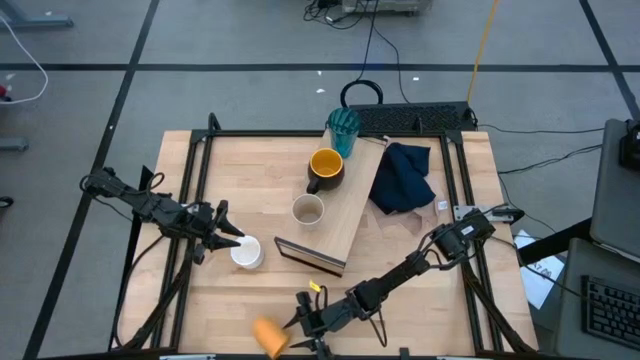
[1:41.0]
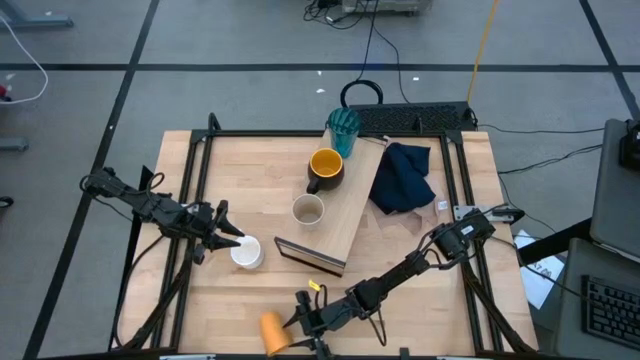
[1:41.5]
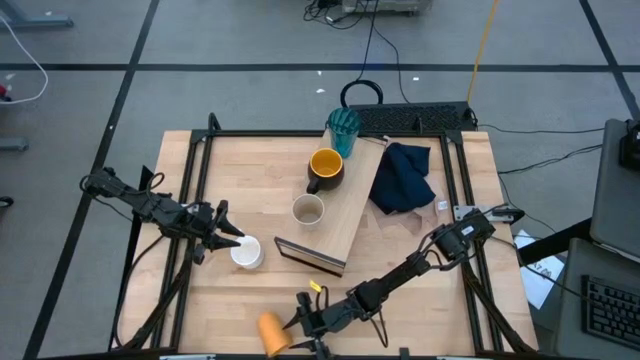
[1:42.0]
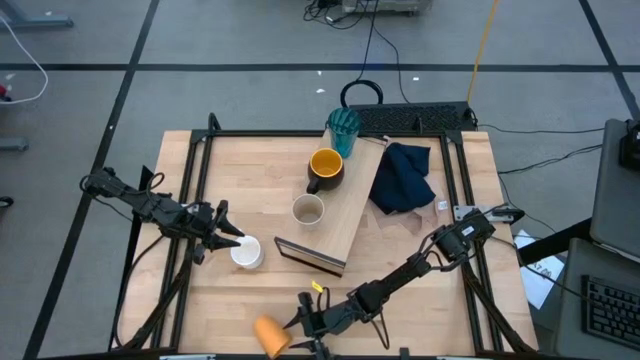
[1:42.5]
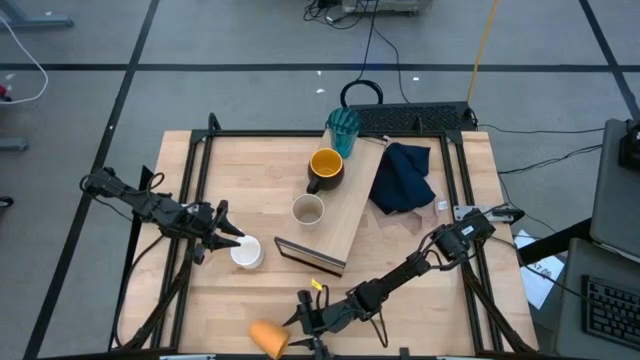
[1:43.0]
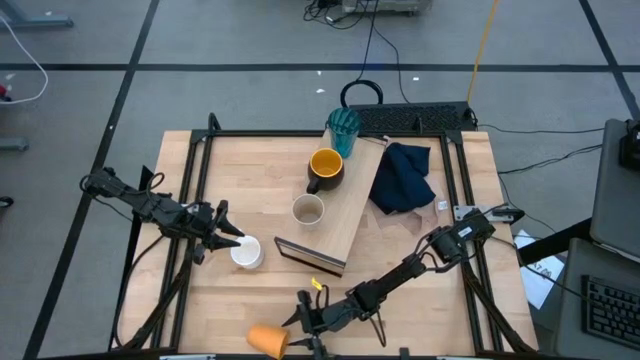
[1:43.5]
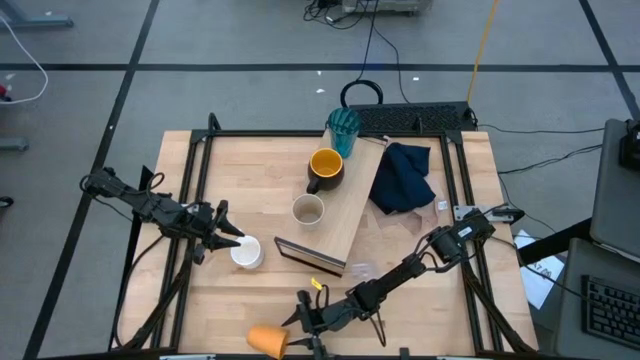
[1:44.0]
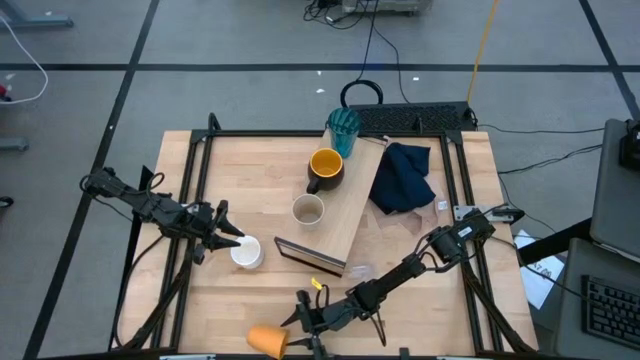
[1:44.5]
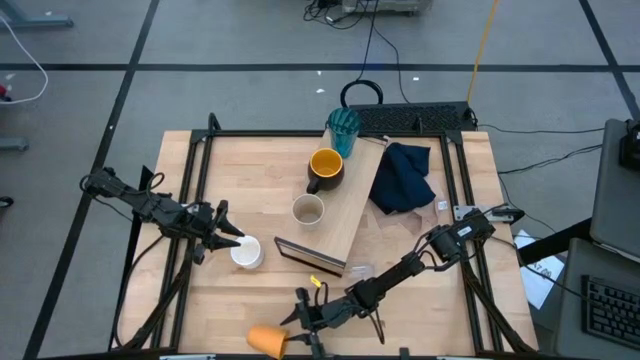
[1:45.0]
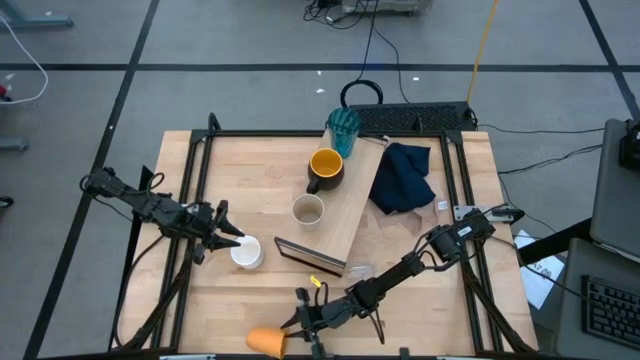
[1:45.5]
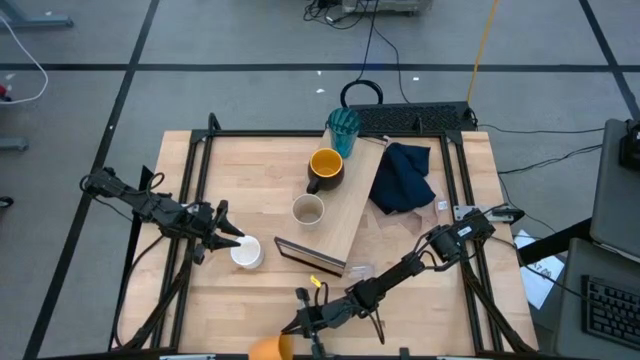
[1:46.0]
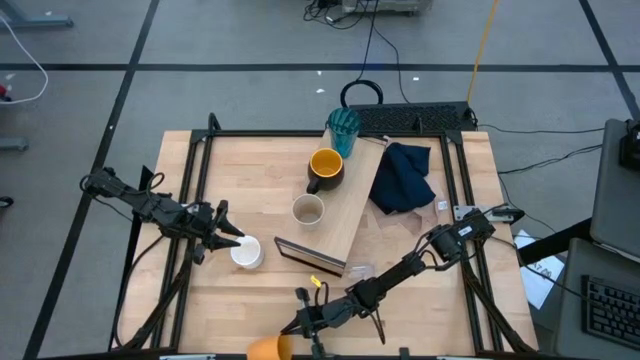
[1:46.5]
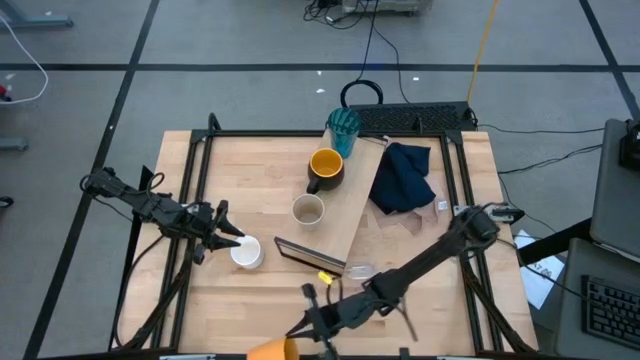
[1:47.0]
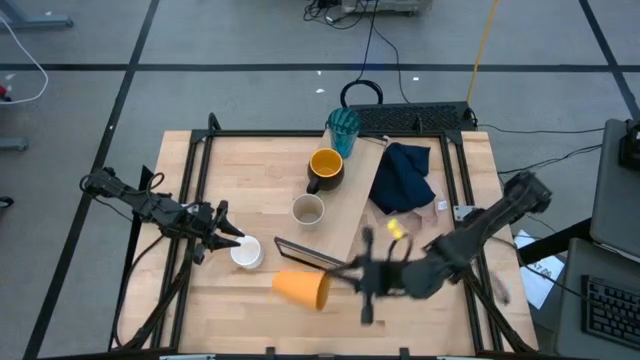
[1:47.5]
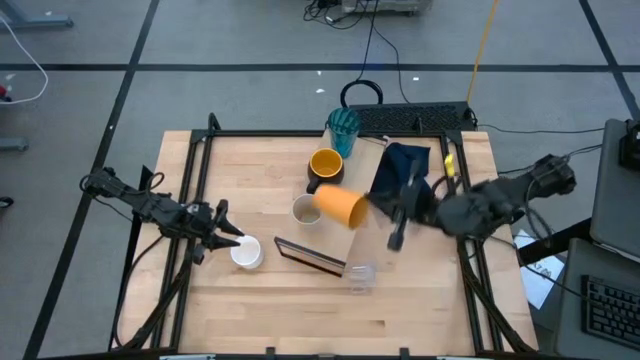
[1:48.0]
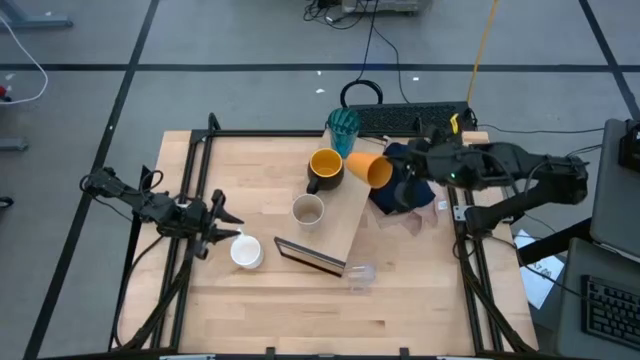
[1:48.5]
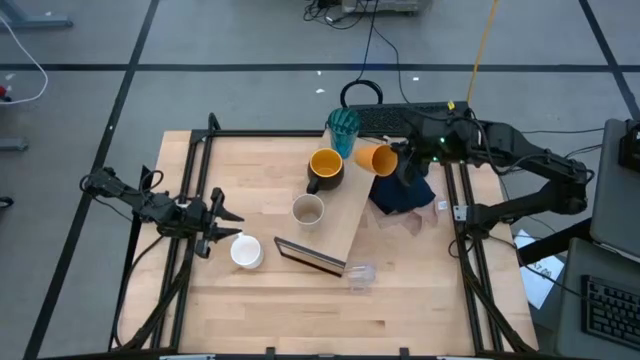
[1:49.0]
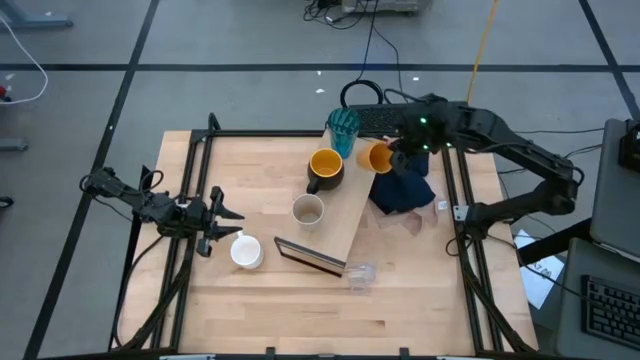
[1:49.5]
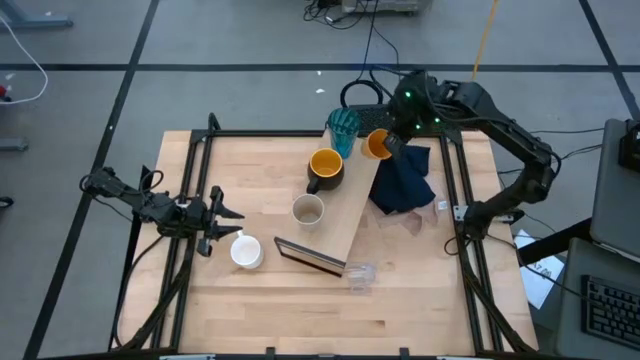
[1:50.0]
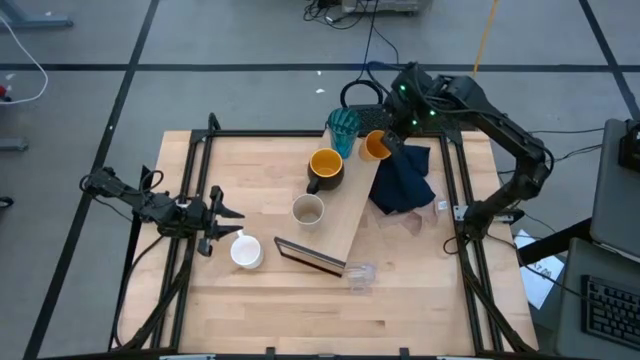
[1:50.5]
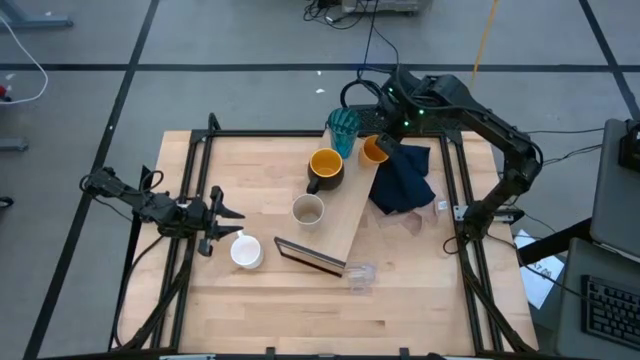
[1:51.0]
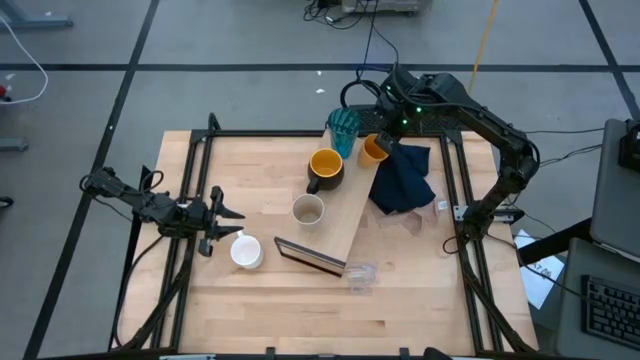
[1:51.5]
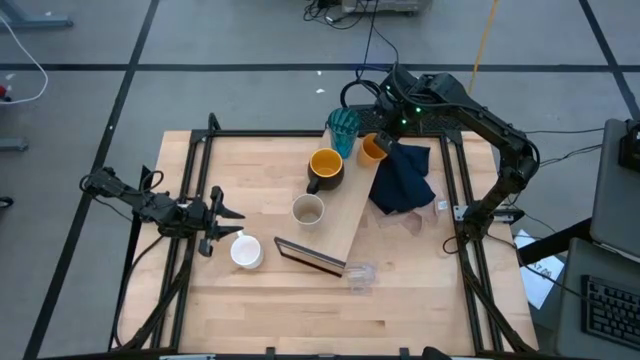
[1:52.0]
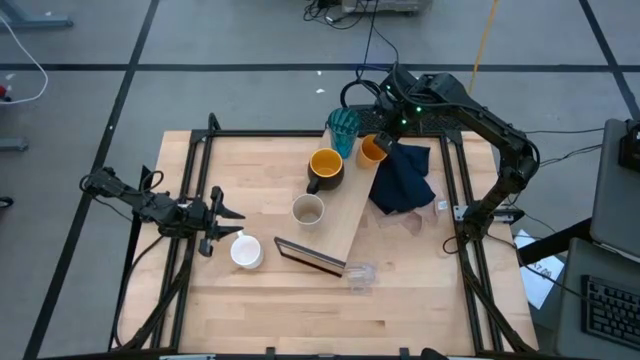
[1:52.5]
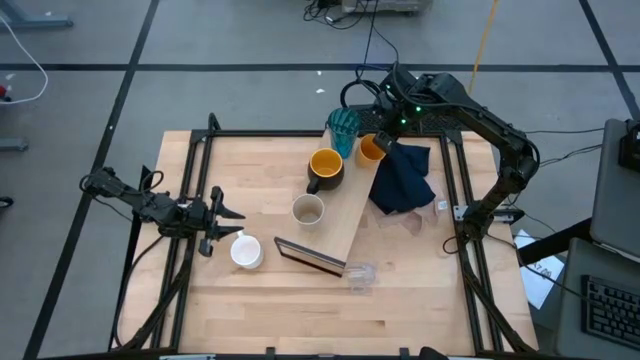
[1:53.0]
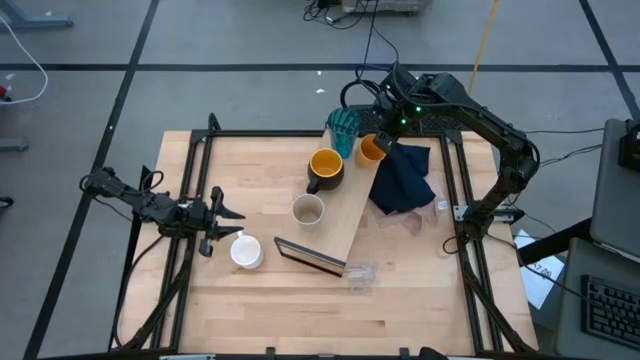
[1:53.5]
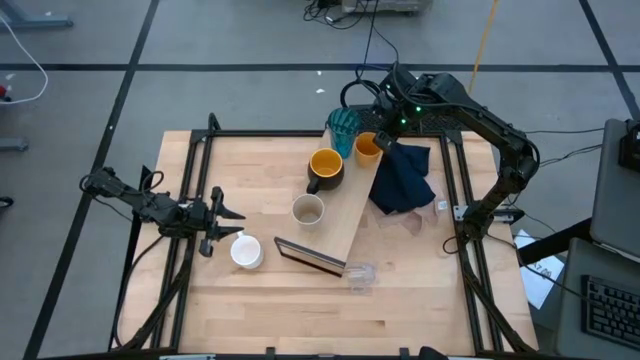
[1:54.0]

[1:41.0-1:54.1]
Task: Stack small to large cups/mugs on shelf
Put the yellow cup on the shelf

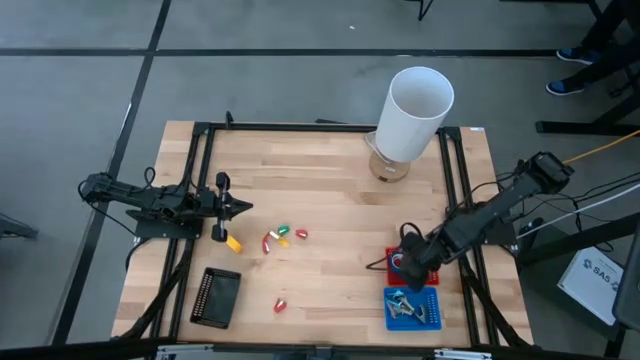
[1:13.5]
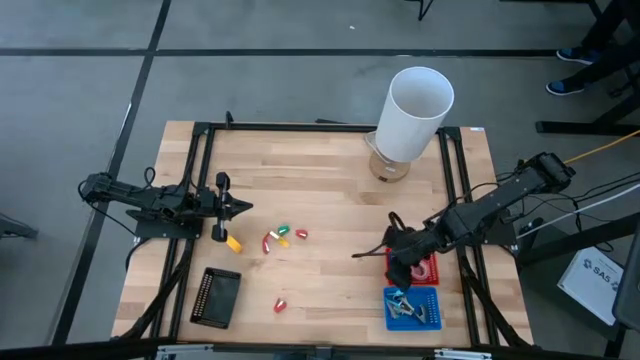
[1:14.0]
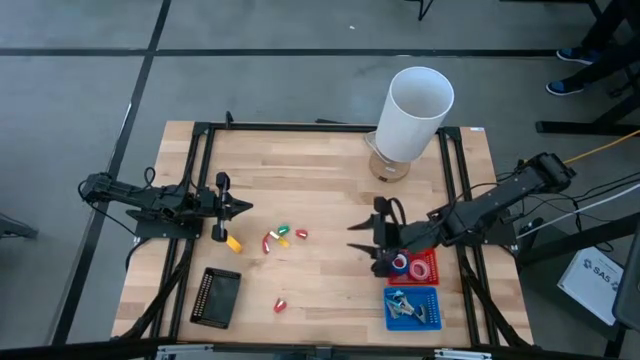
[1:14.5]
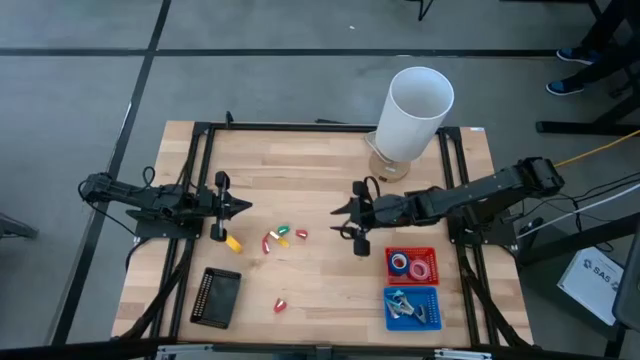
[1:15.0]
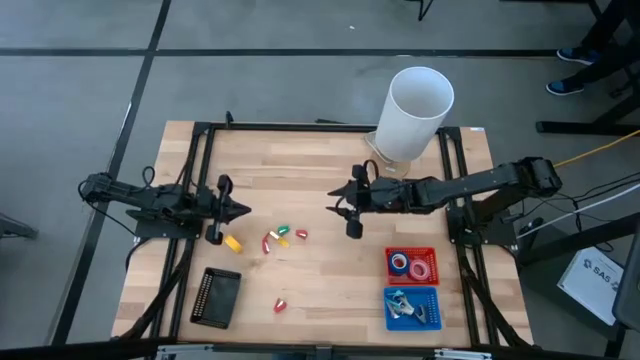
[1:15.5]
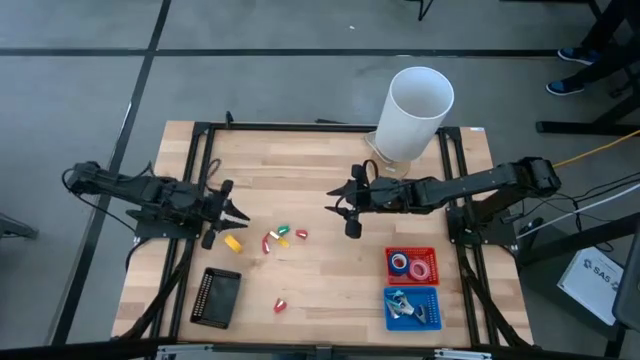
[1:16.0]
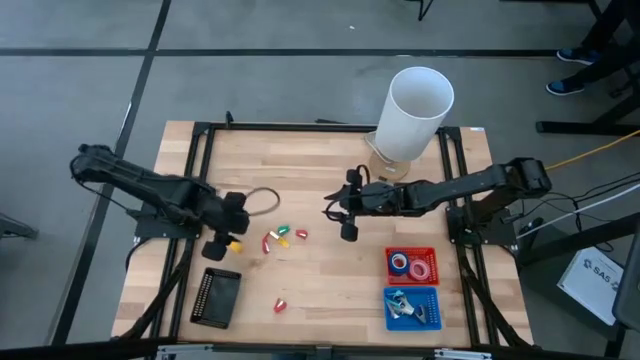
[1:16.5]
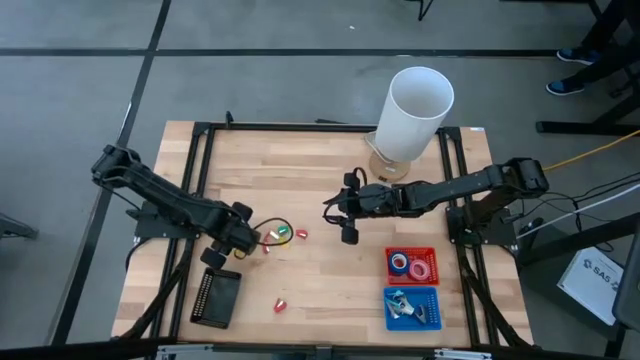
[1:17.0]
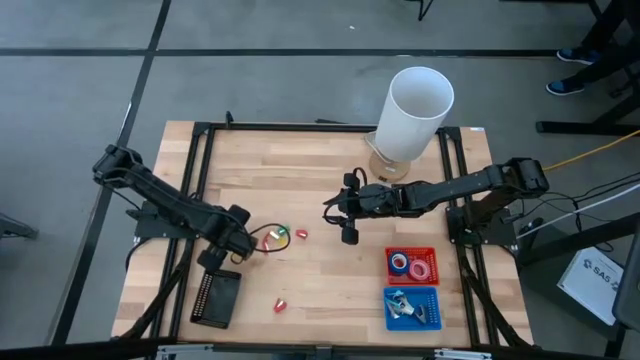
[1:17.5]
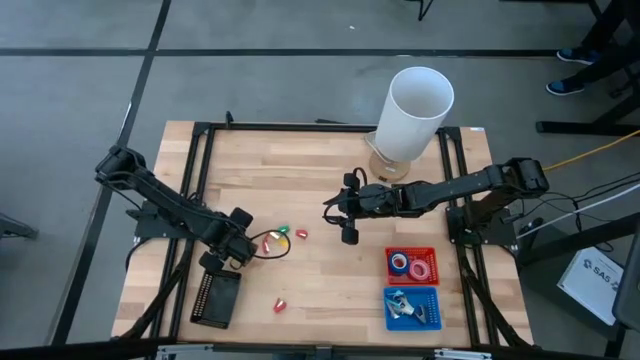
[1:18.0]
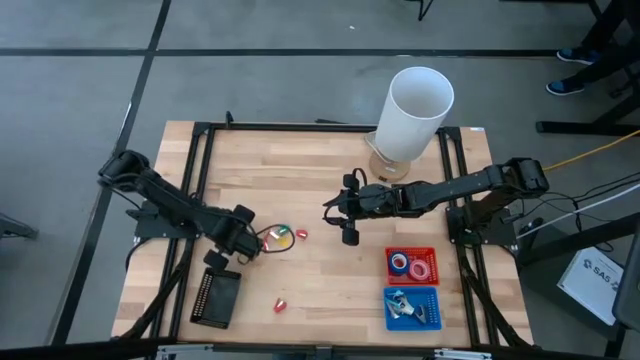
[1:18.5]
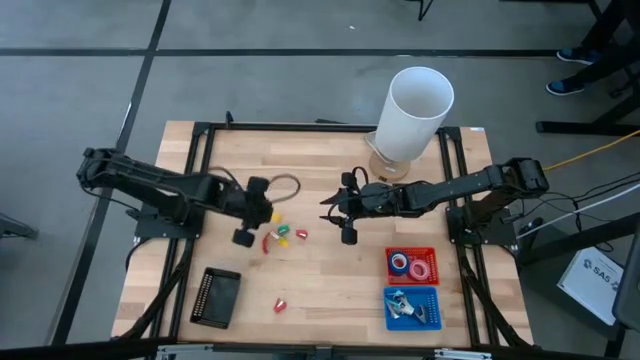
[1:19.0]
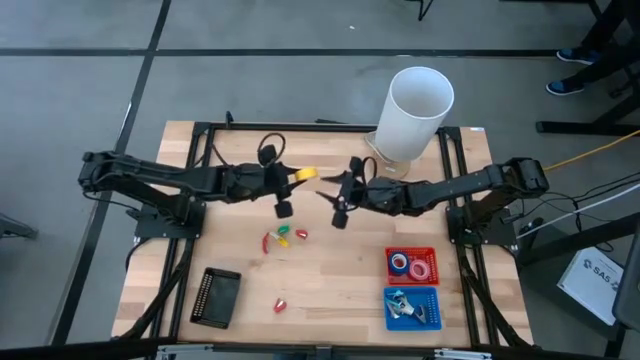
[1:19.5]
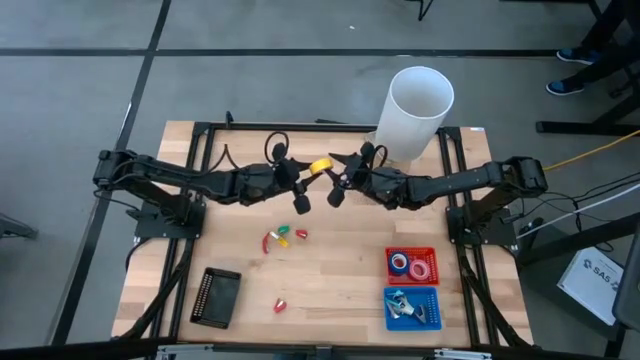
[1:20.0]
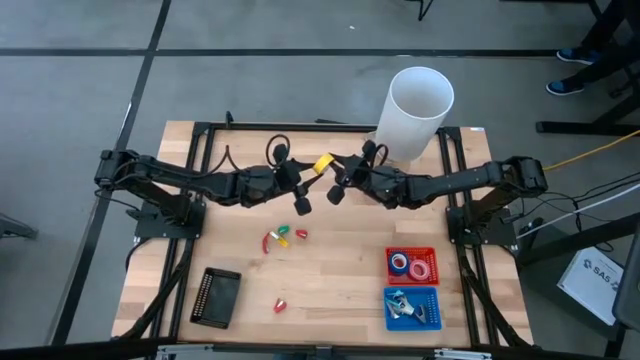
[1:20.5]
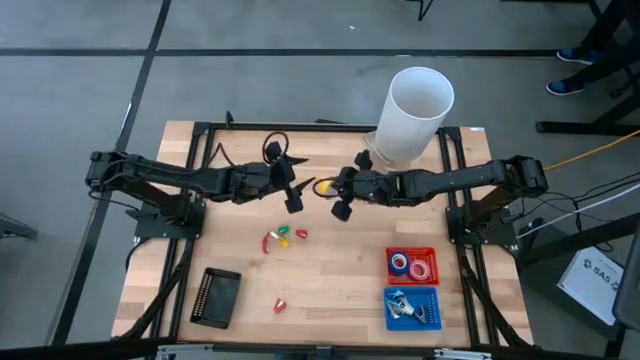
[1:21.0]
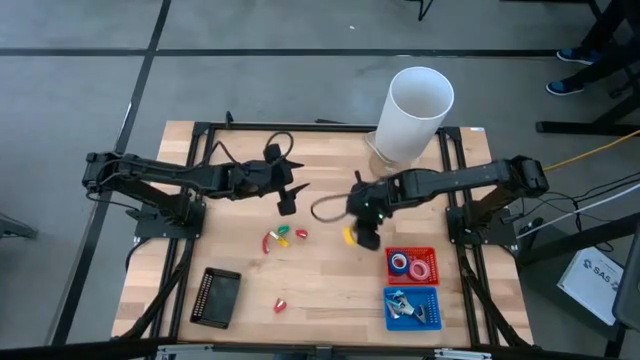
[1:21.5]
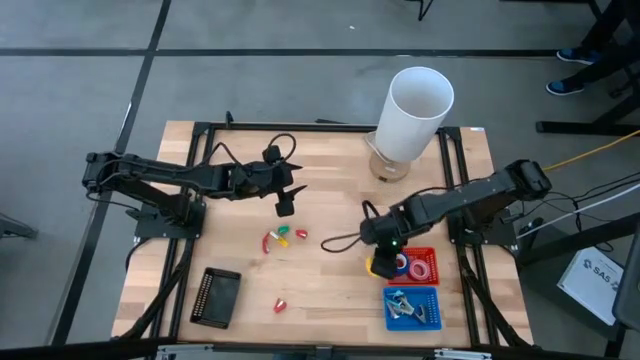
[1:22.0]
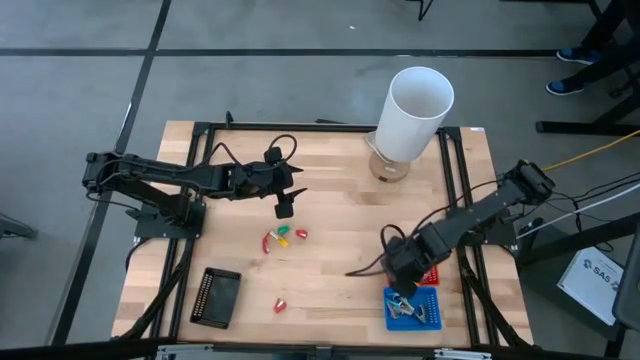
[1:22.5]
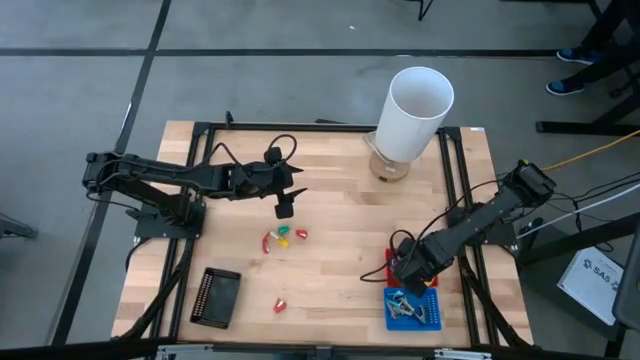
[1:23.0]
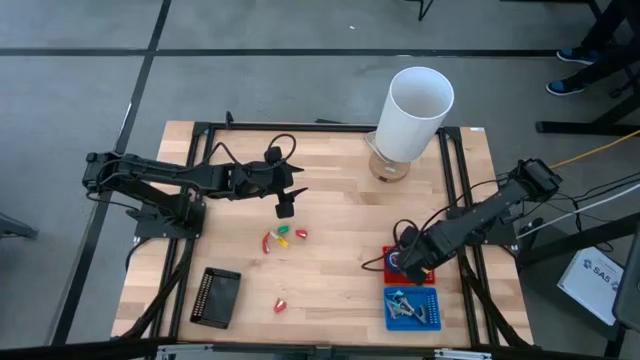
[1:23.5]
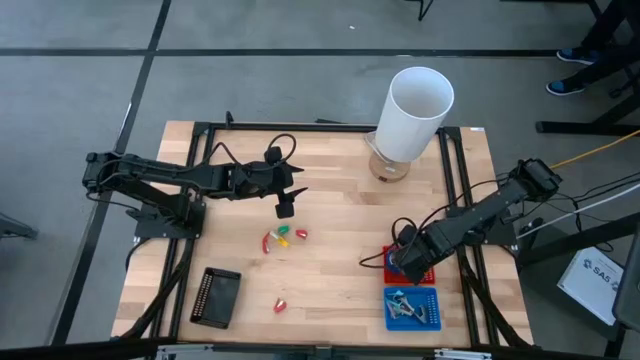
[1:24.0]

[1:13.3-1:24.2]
Task: Pick and place Stapler, Stapler remover, tape
Put the yellow tape into the red basket
